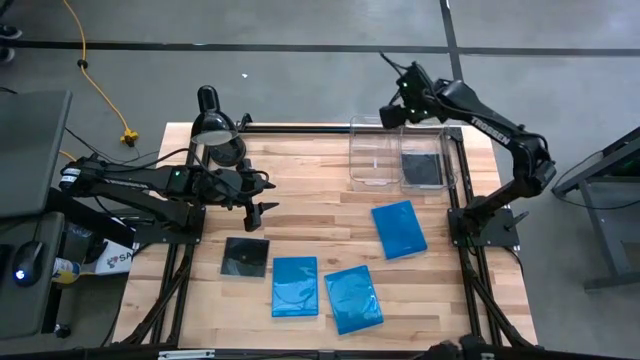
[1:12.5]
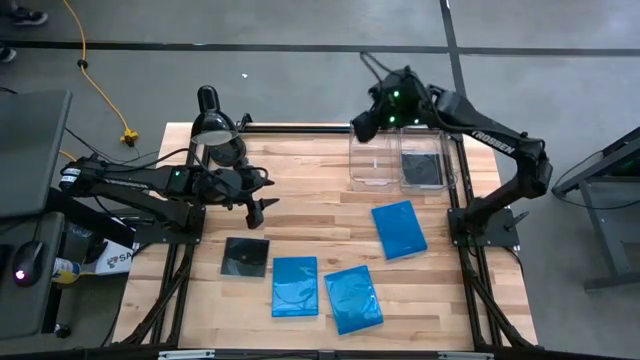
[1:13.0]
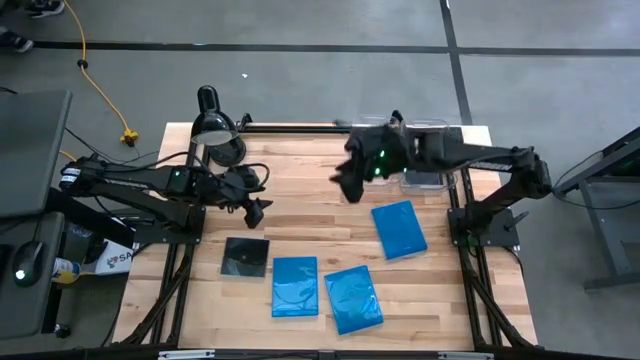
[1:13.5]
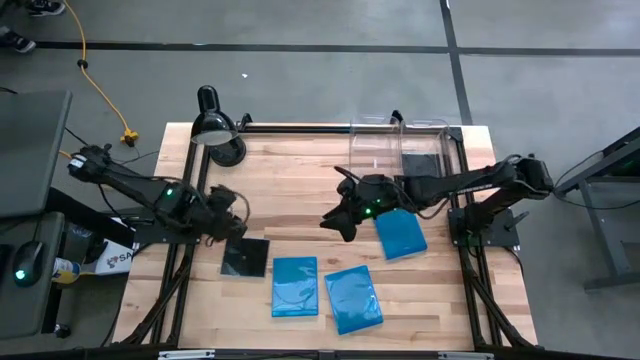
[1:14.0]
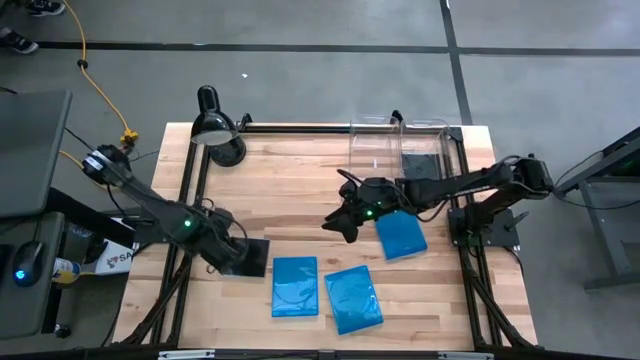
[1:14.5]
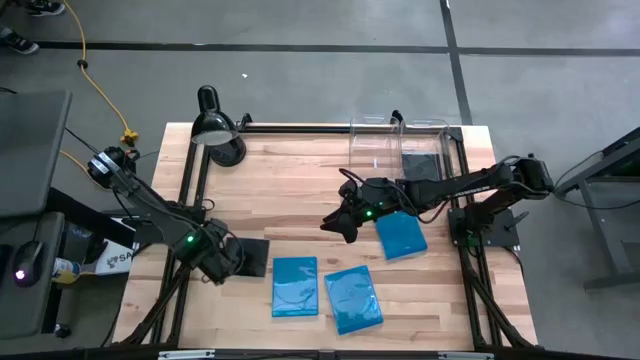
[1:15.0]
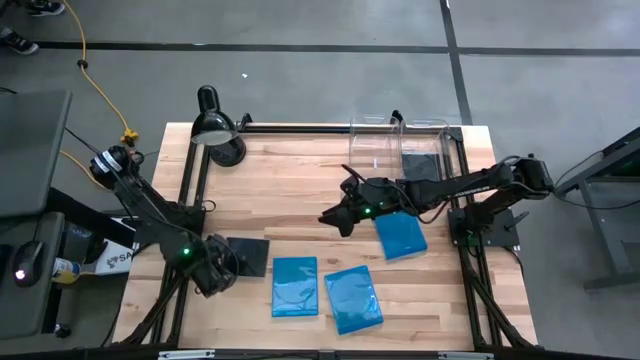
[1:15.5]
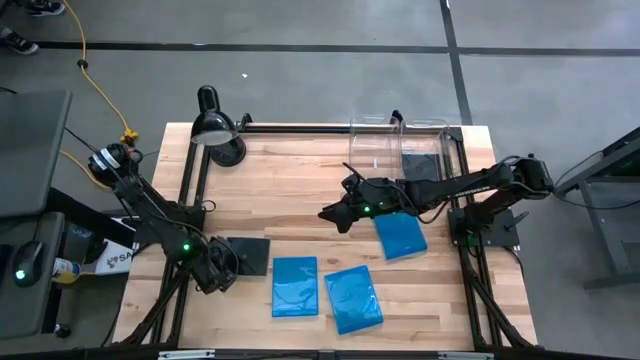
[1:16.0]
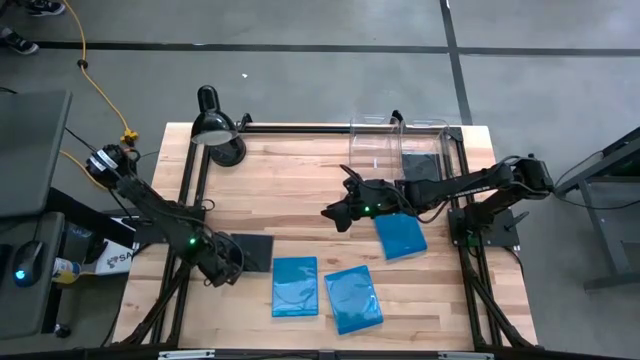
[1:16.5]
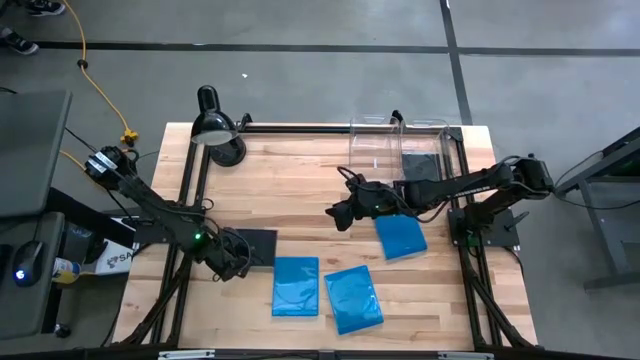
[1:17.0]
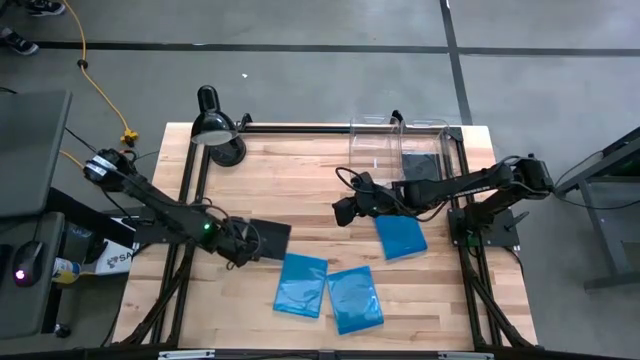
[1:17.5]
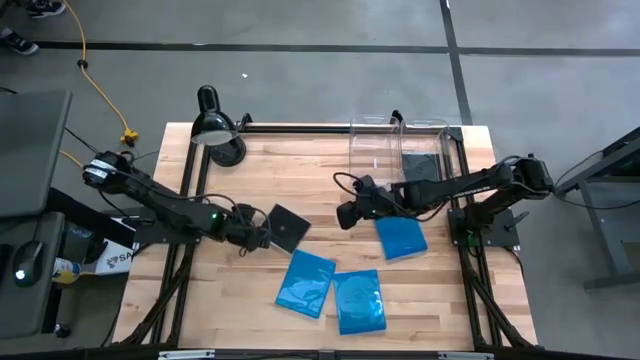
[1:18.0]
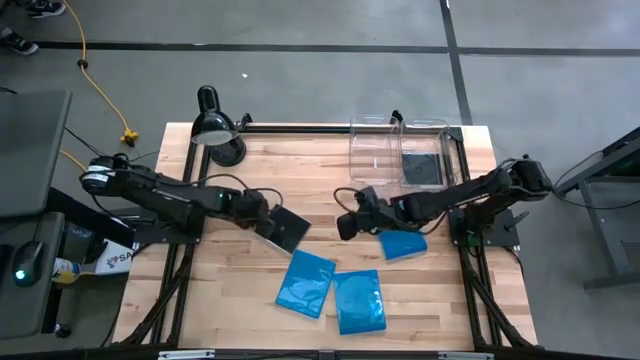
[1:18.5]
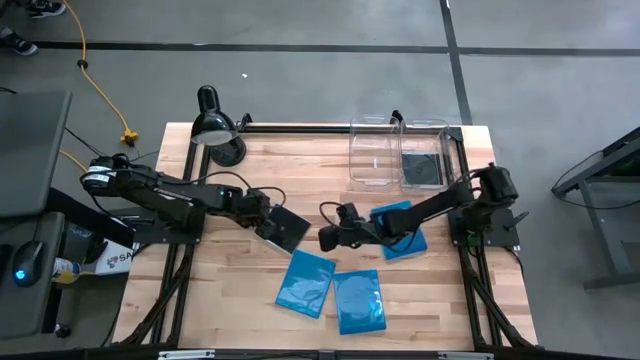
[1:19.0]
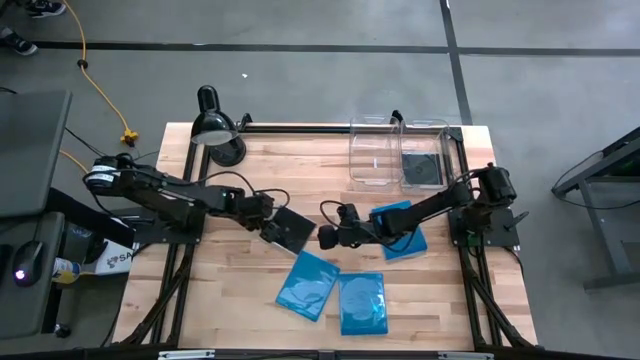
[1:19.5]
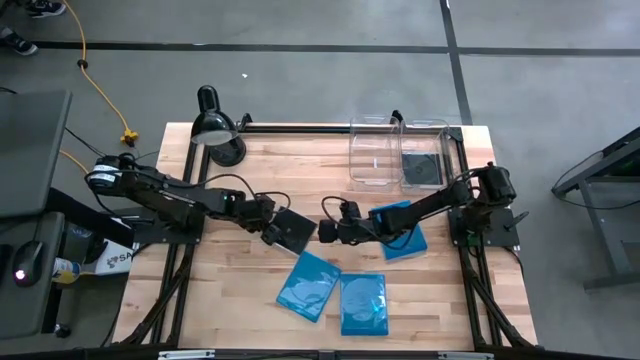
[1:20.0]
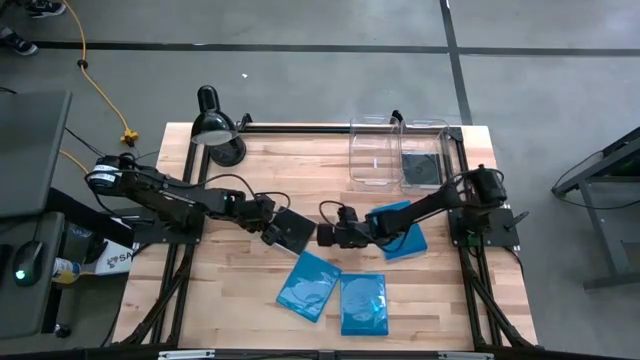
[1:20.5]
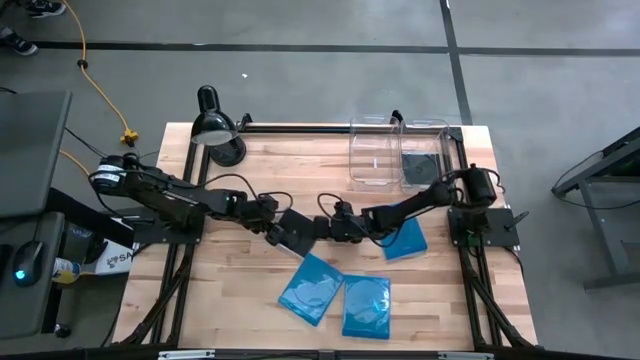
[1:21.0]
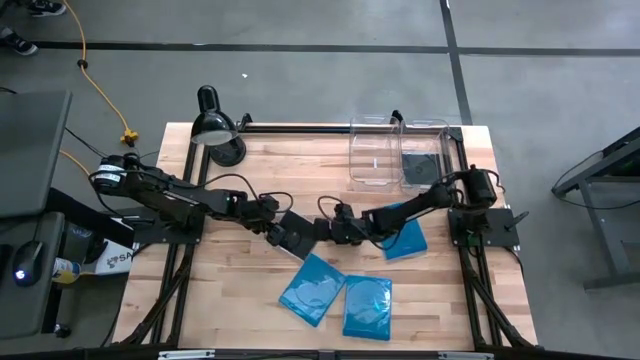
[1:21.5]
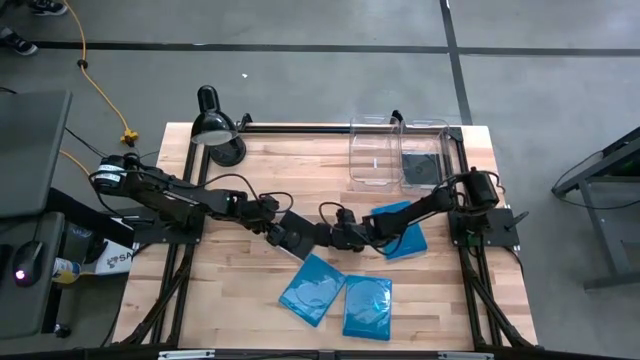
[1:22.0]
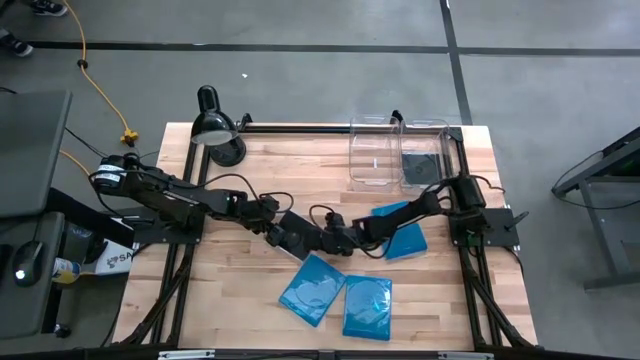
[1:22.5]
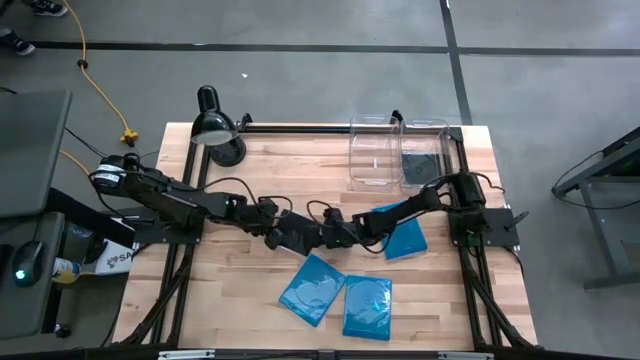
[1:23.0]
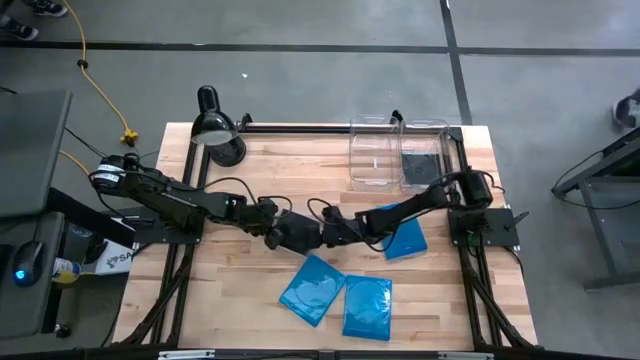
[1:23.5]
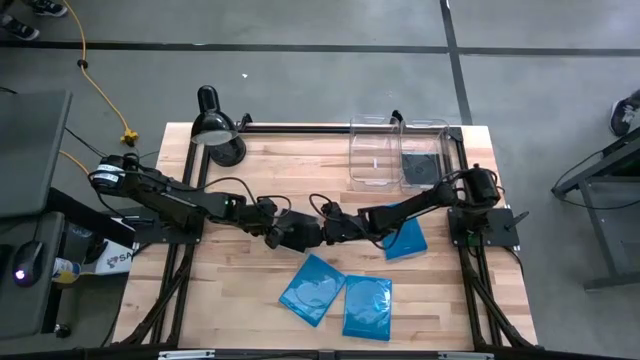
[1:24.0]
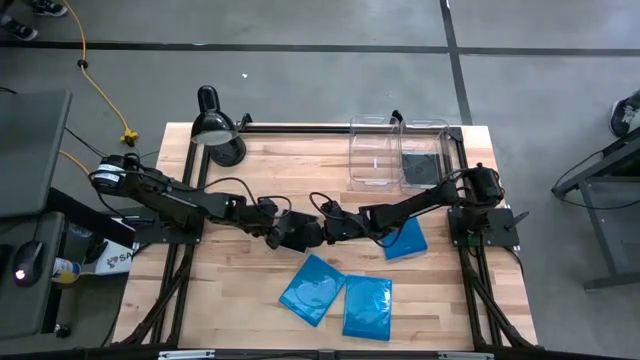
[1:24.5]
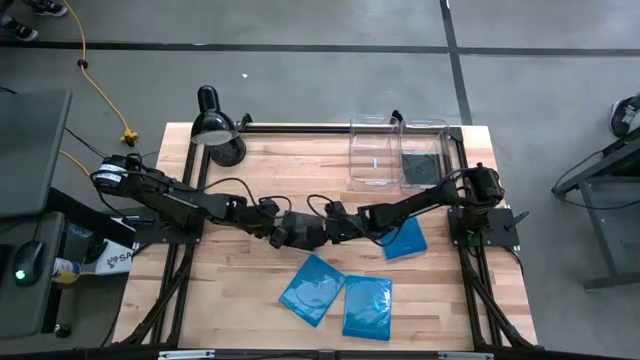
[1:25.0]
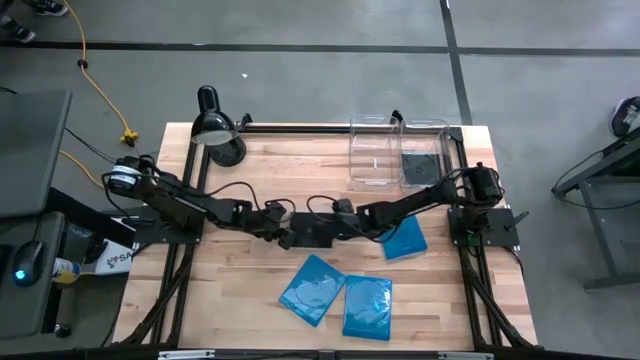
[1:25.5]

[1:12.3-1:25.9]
Task: Pick & place jewel cases by type
Put the black CD case into the right transparent bin

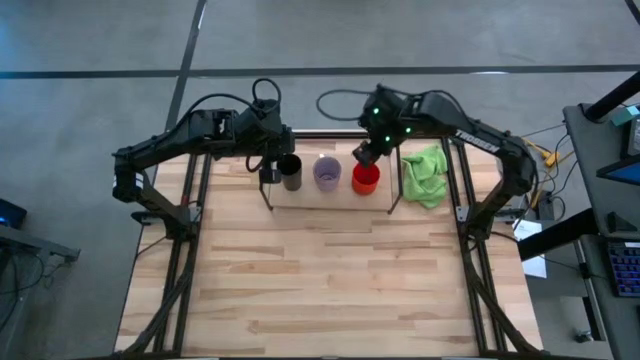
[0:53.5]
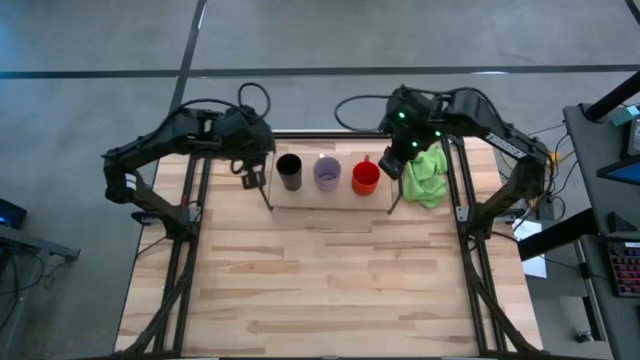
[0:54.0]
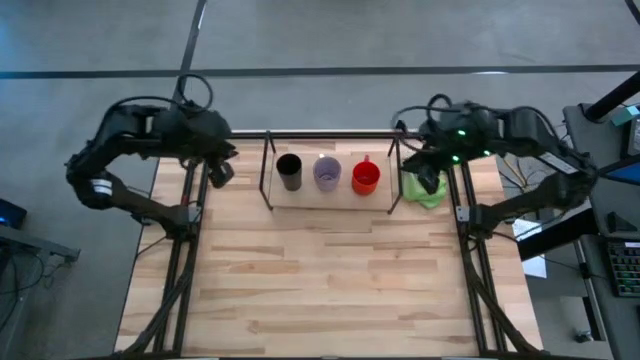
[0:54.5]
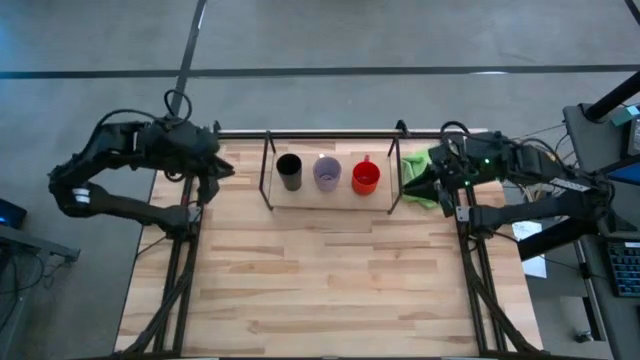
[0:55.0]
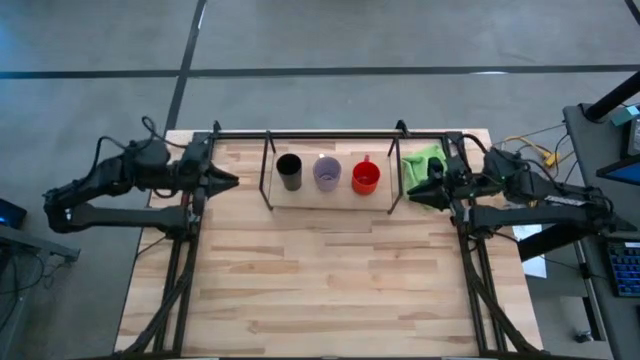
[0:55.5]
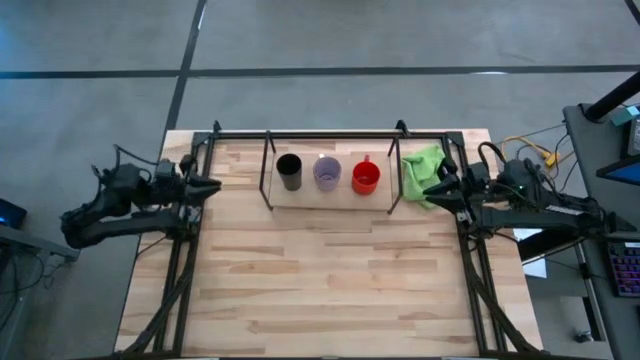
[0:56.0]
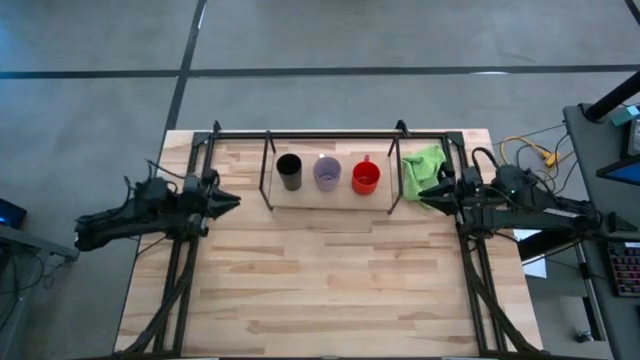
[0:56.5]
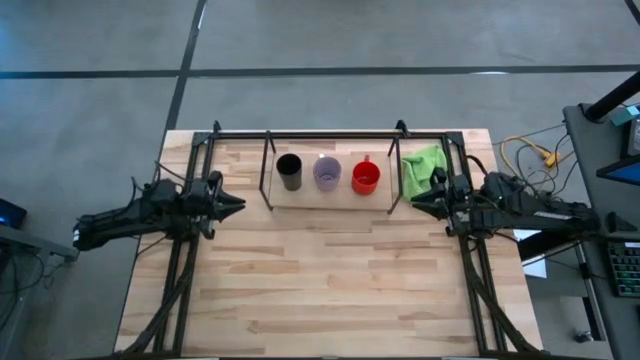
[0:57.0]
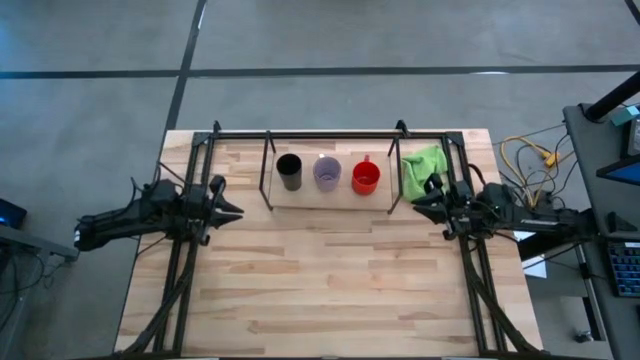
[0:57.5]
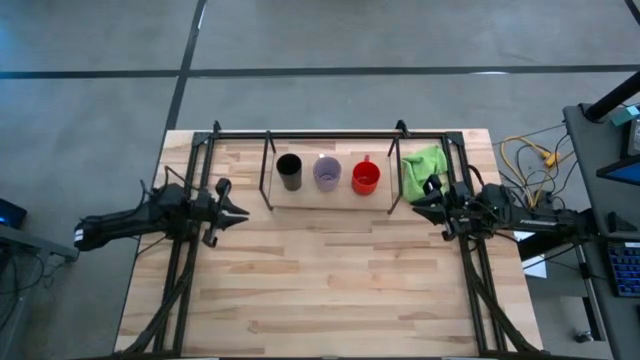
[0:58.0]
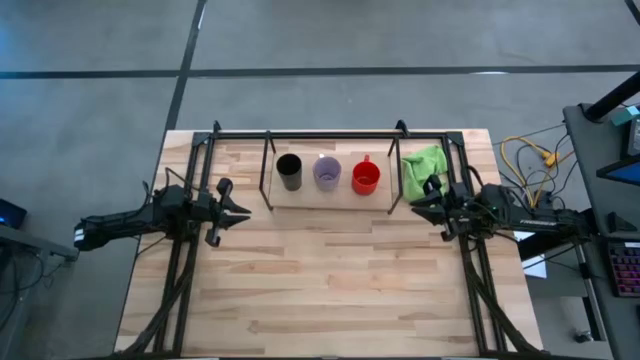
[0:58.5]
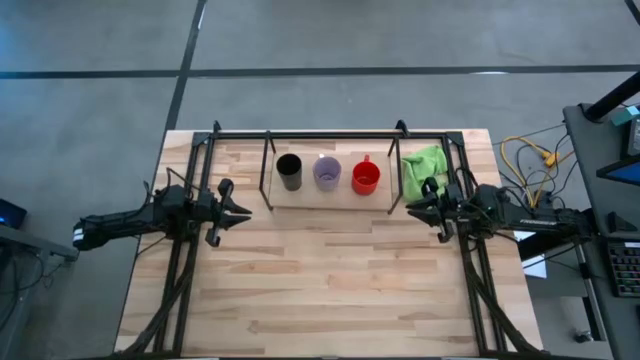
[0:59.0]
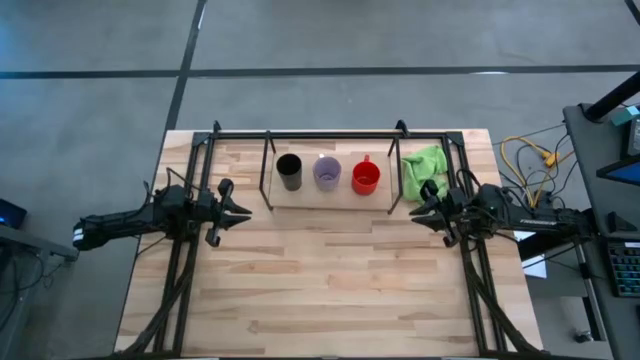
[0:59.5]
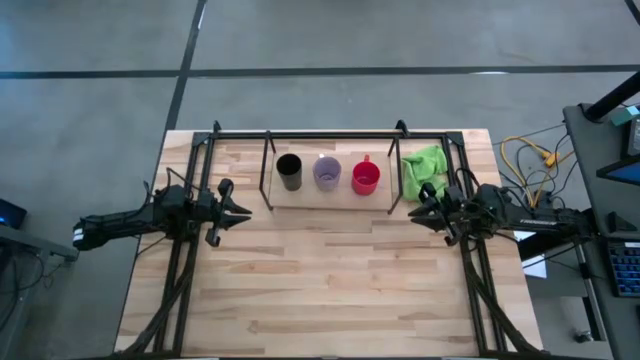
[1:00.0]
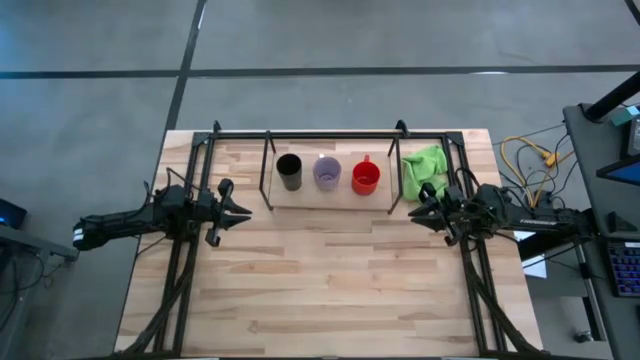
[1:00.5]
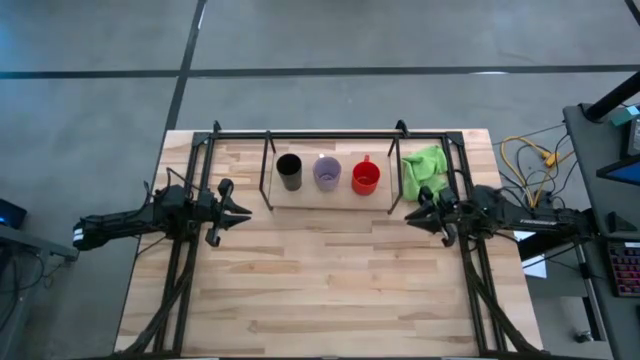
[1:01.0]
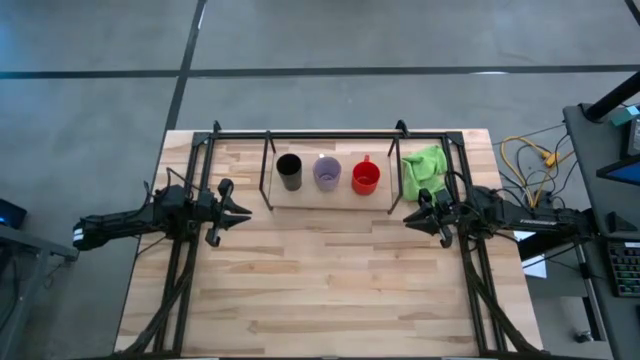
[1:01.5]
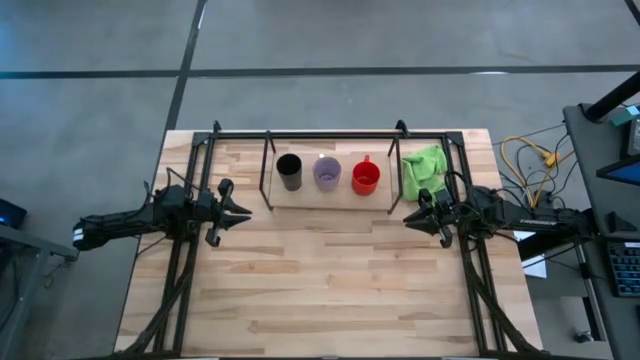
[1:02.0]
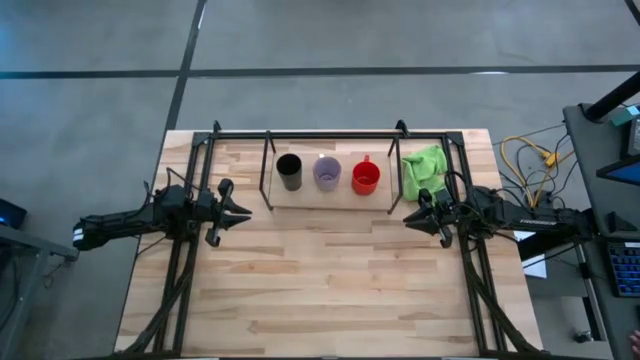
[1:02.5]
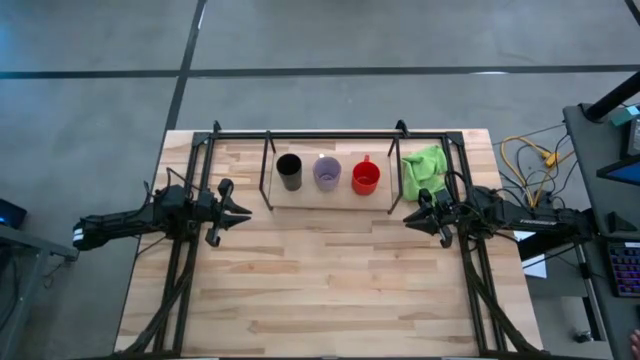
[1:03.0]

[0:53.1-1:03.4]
Task: Stack small to large cups/mugs on shelf
Return to Home Position
